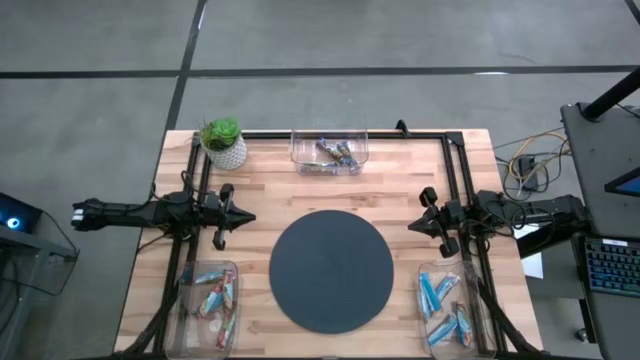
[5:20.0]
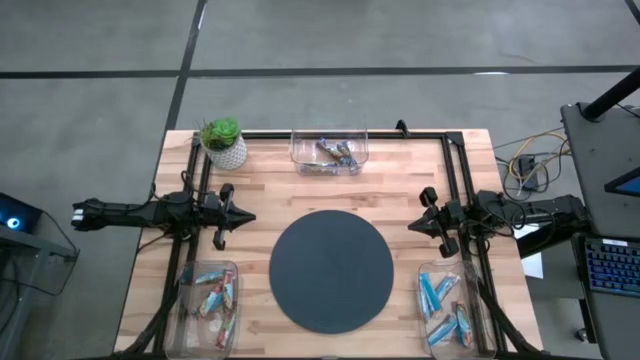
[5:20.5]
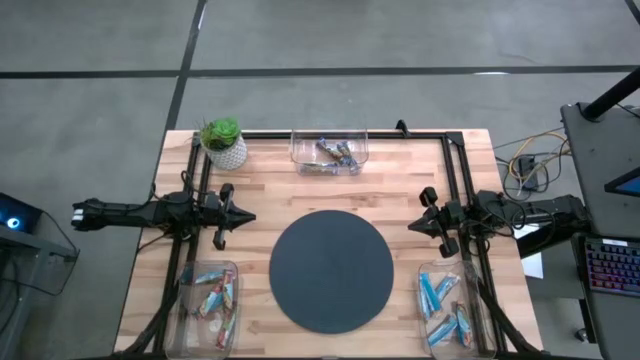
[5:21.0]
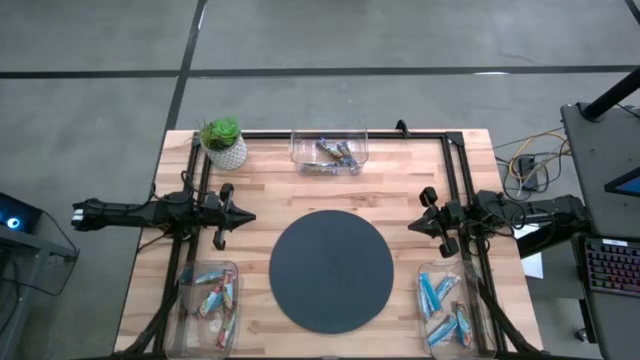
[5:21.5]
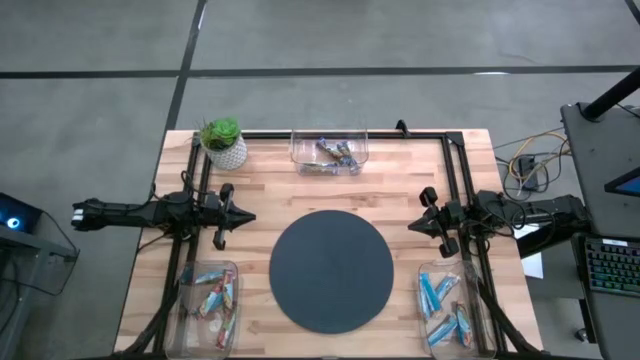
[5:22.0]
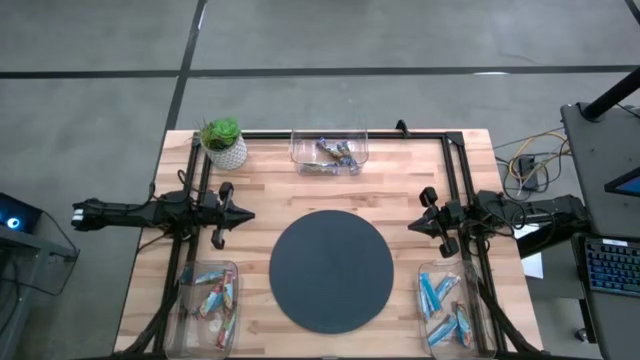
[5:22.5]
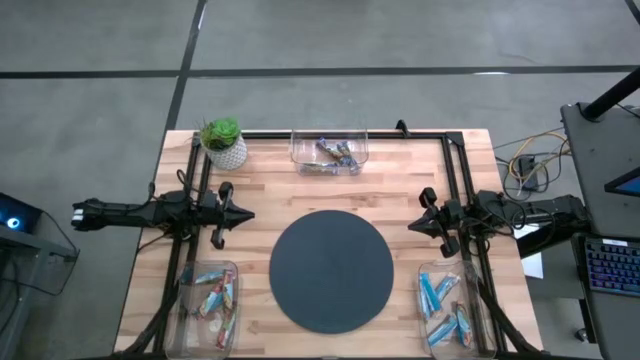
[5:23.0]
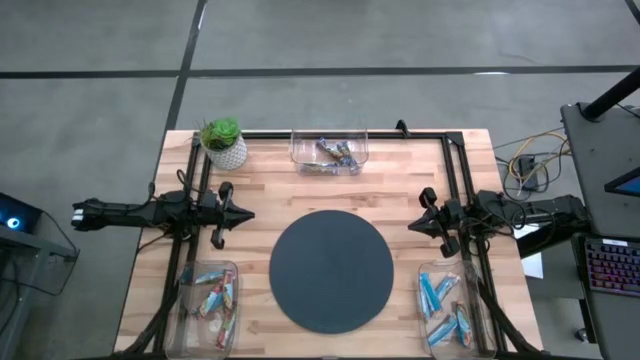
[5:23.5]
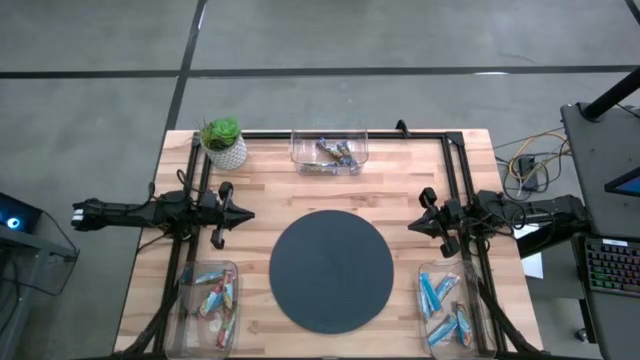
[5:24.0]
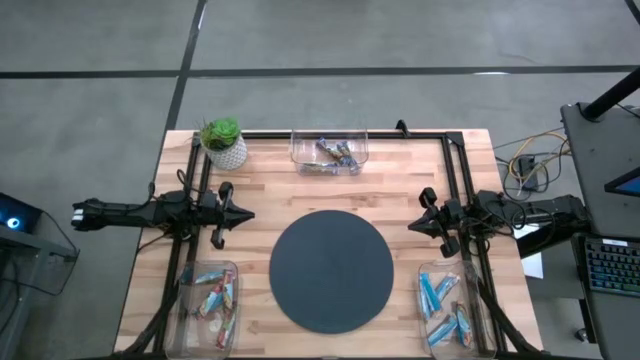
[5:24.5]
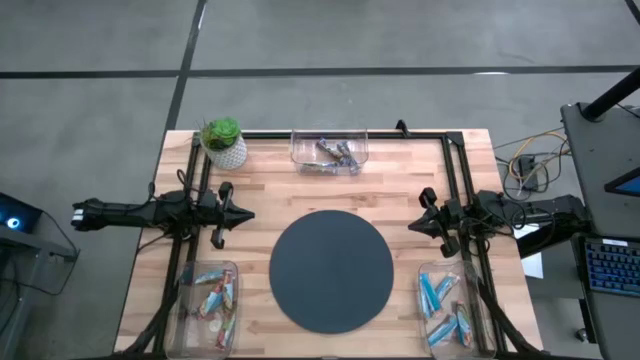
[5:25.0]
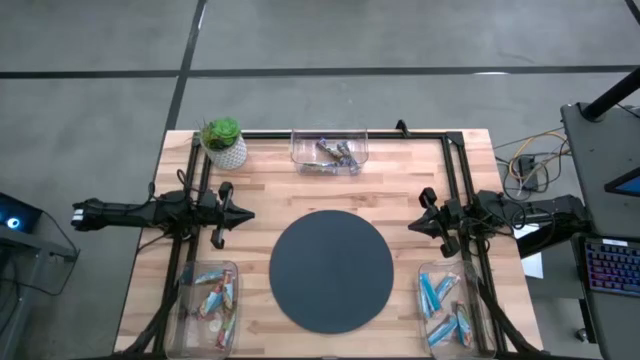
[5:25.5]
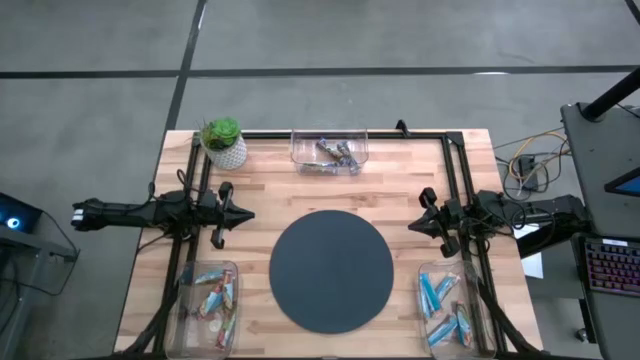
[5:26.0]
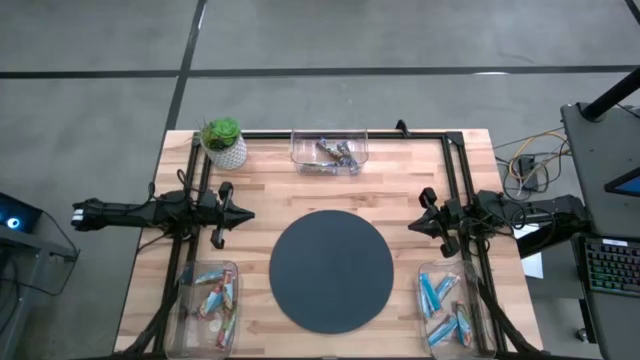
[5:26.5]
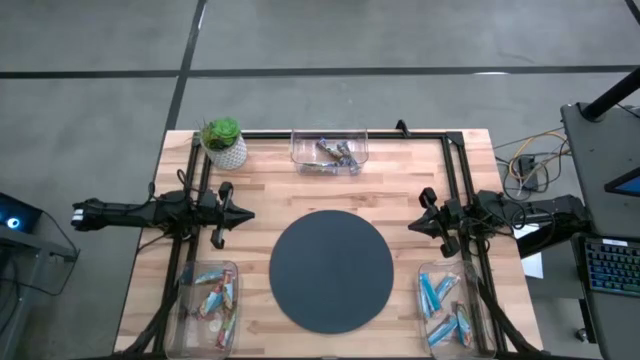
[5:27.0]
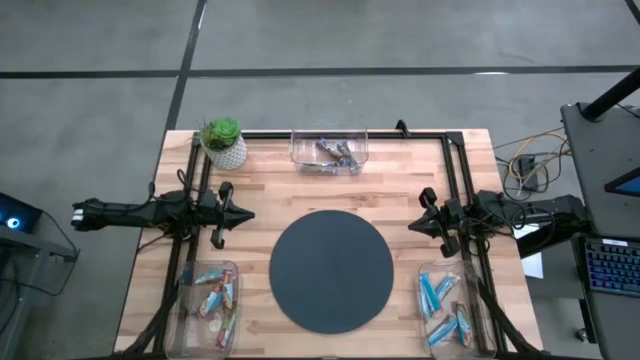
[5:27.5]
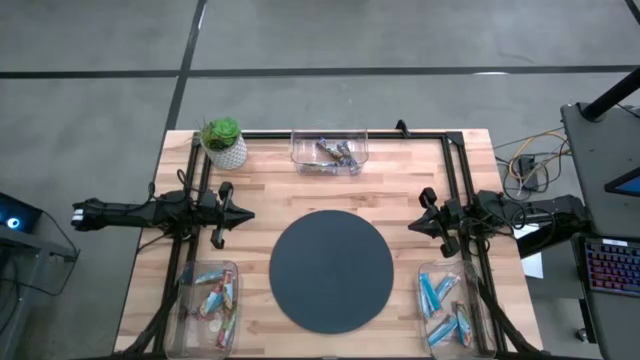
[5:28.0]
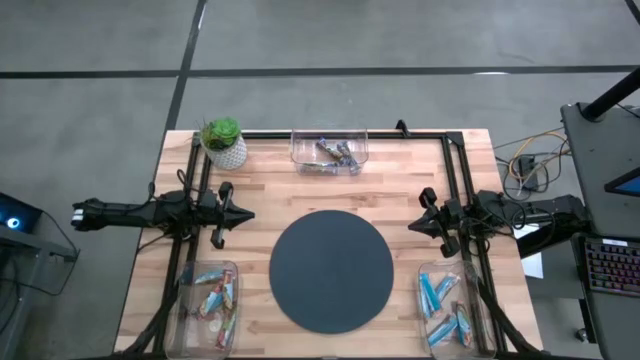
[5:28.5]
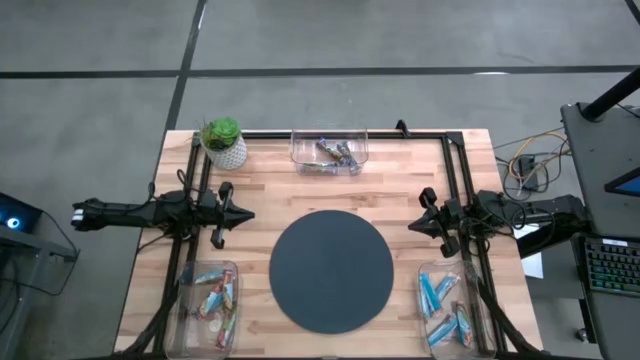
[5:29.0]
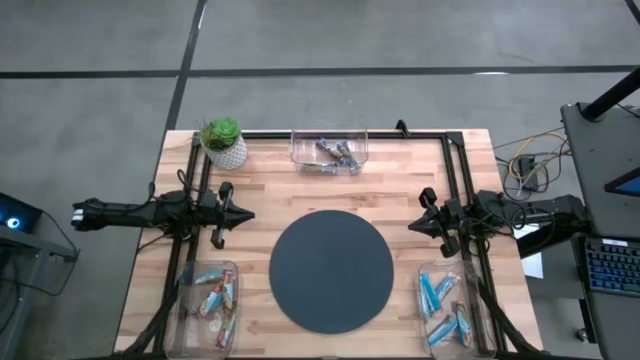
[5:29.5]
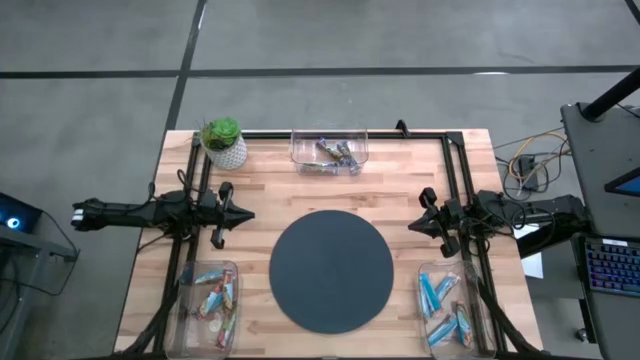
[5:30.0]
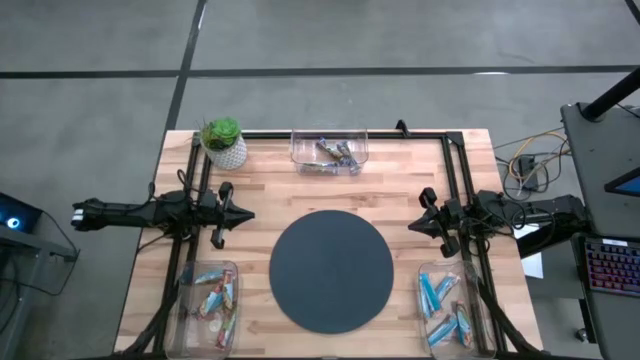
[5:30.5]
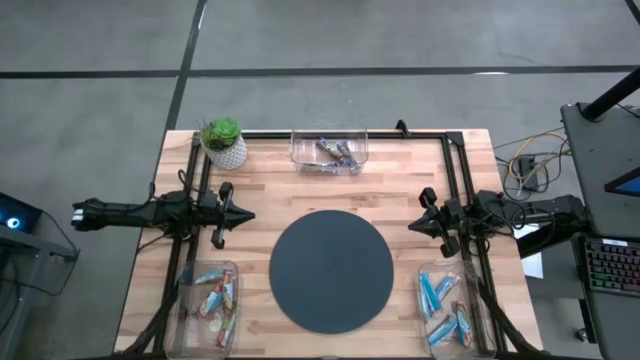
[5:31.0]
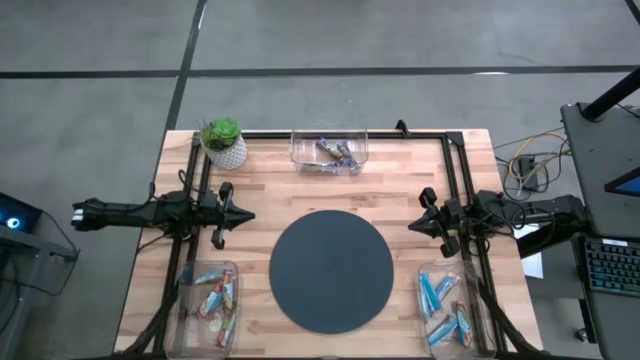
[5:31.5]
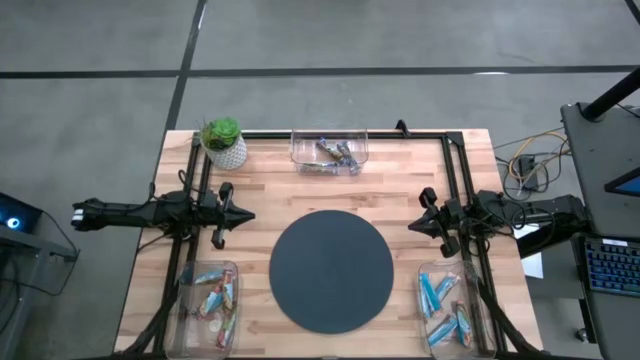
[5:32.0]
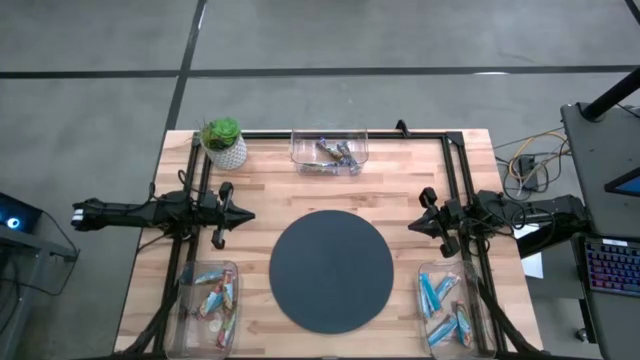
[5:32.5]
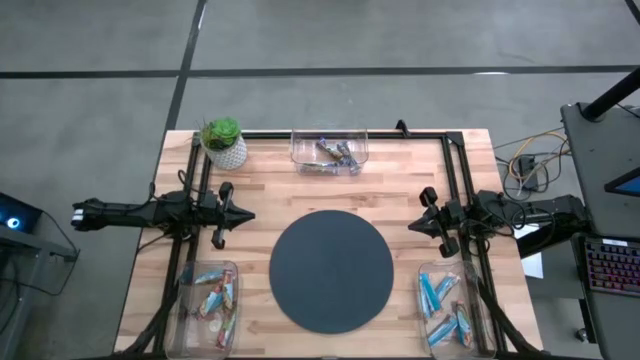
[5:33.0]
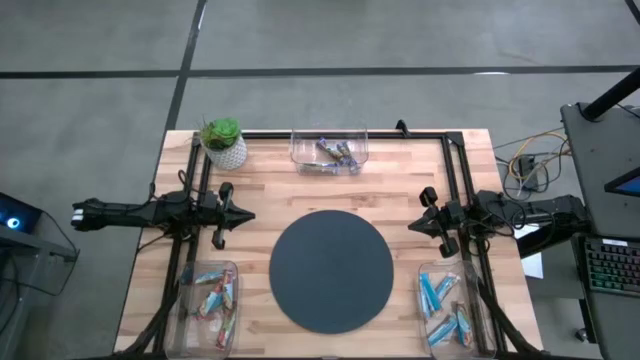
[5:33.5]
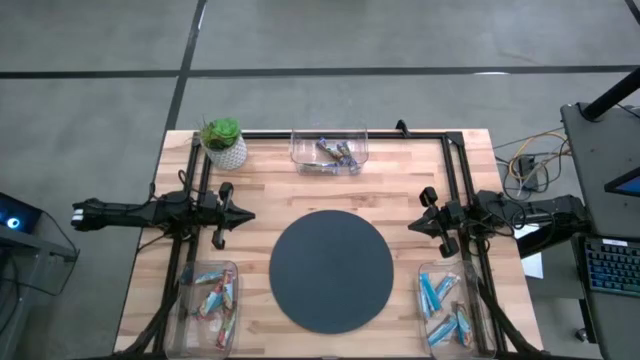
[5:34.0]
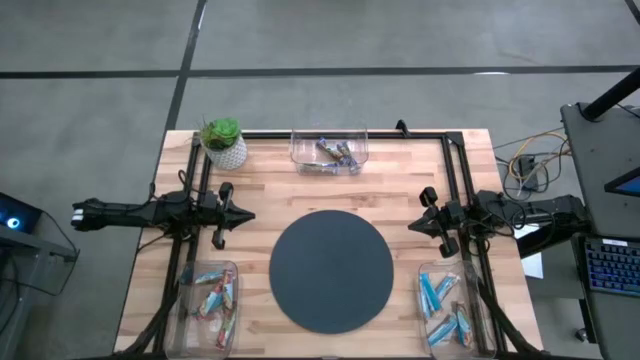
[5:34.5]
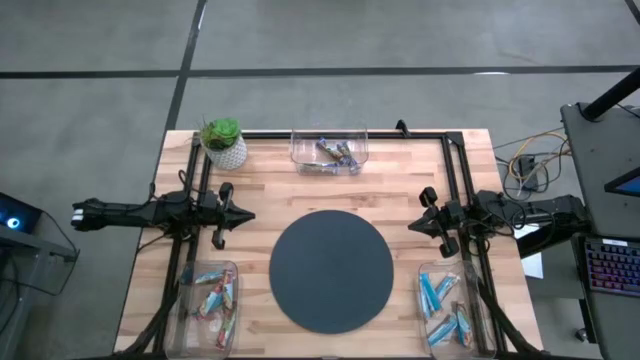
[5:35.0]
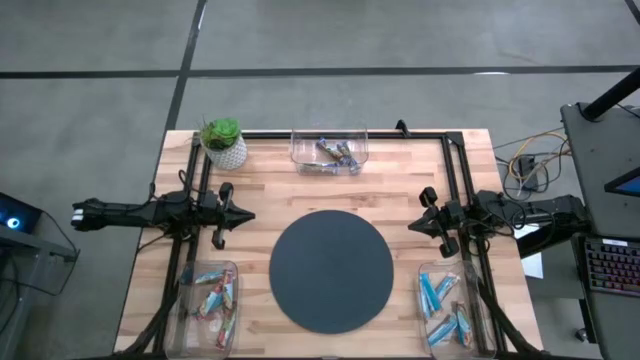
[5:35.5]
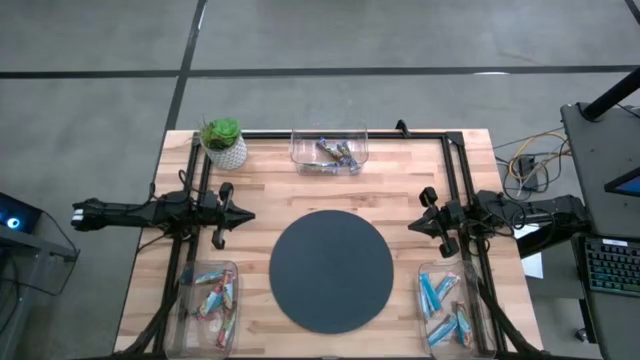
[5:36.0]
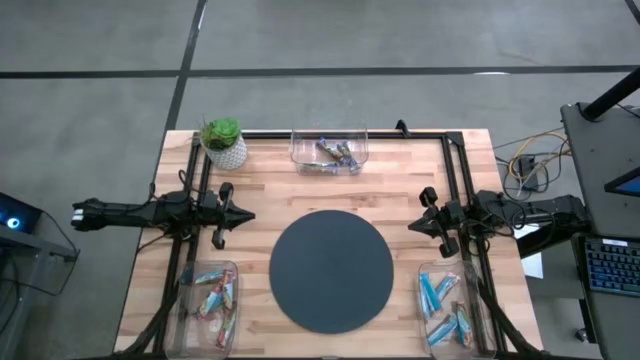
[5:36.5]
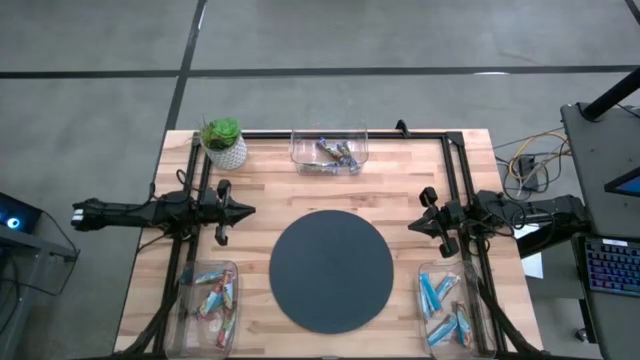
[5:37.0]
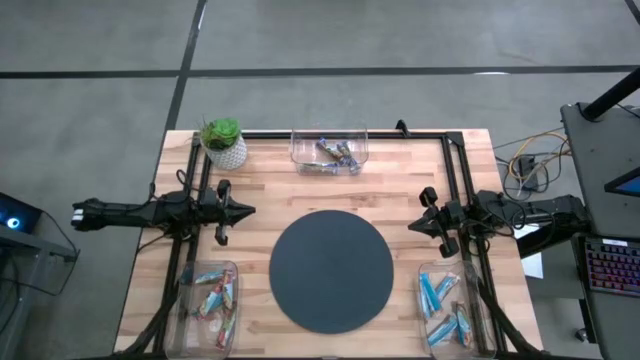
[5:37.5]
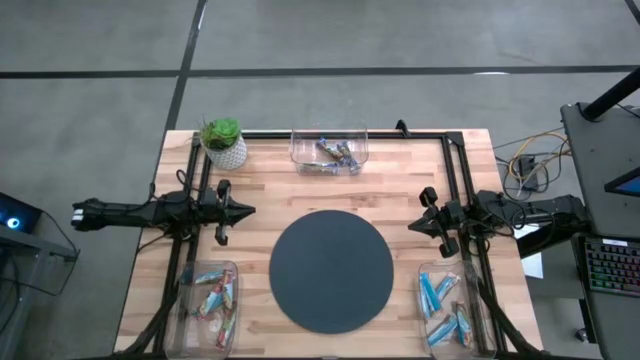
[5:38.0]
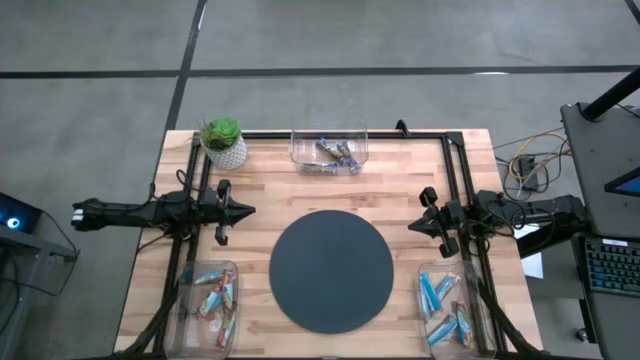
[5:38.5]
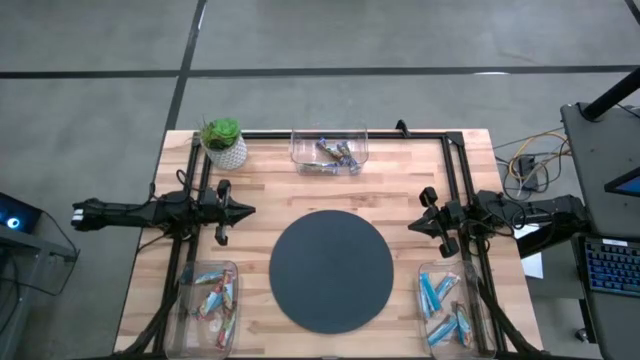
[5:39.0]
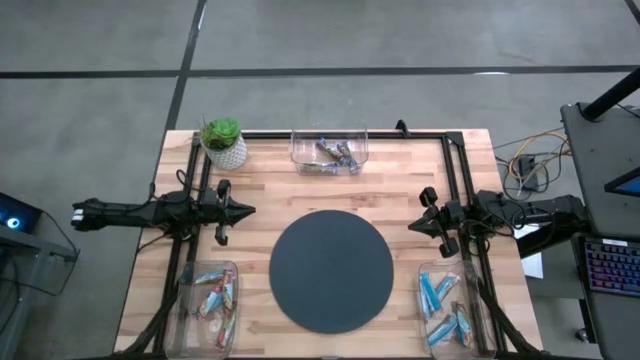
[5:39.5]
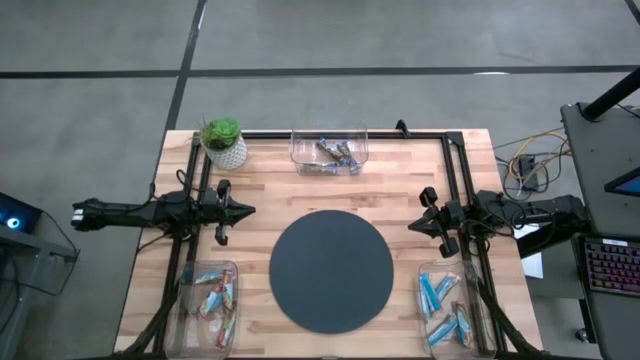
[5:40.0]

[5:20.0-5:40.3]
Task: Pick and place Granola Bars by type
Return to Home Position

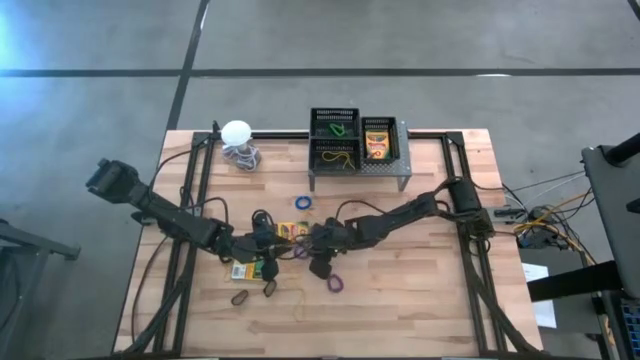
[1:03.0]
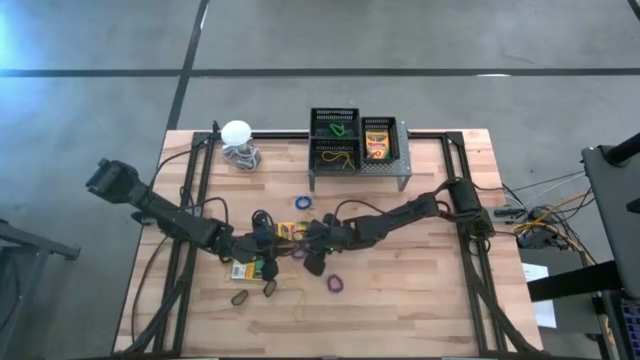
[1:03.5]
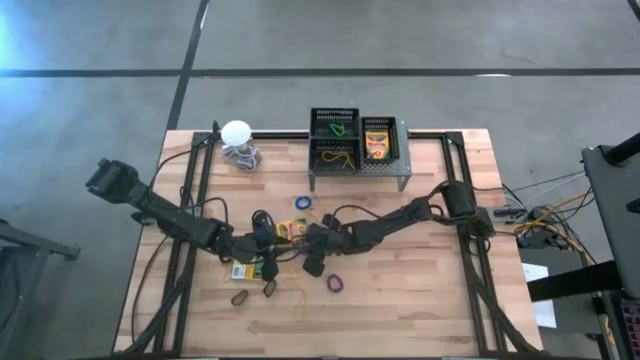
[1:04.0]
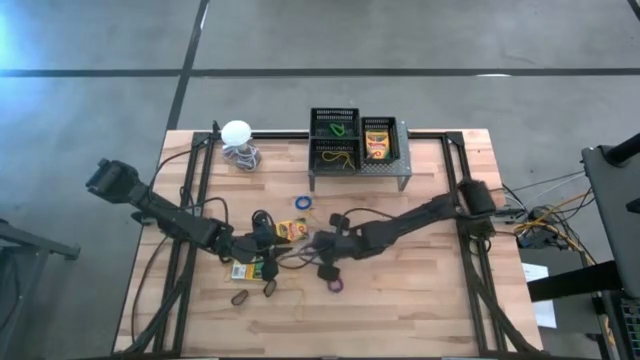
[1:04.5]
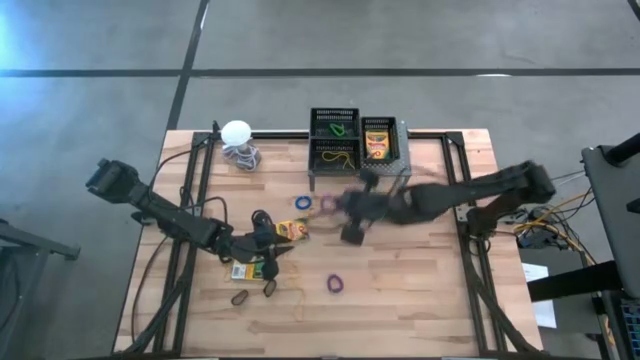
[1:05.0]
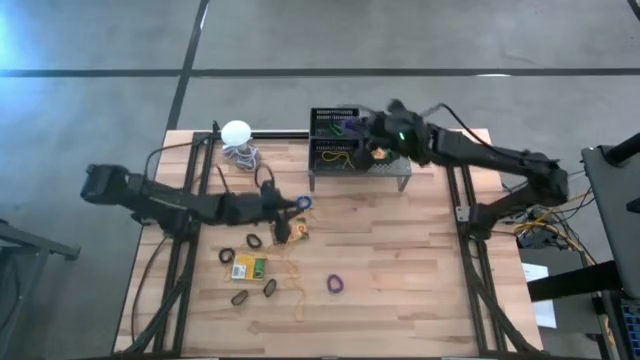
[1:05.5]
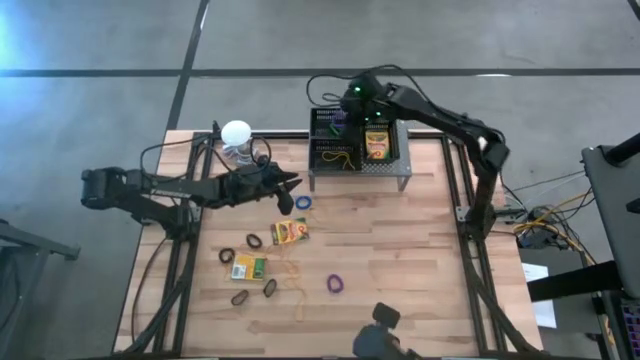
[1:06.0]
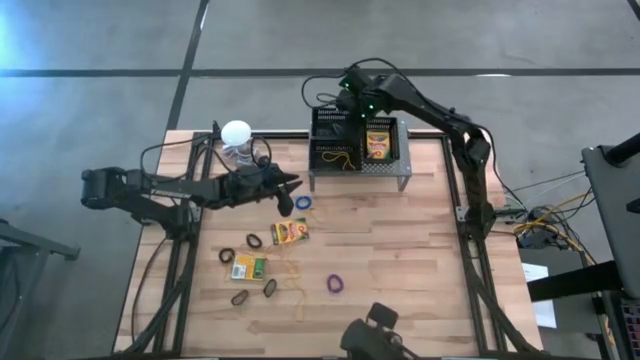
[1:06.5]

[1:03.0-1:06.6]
Task: Pick & Place Office Desk Supplies
Put the purple spring keychain into the top left black bin
